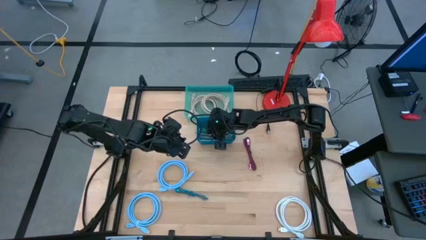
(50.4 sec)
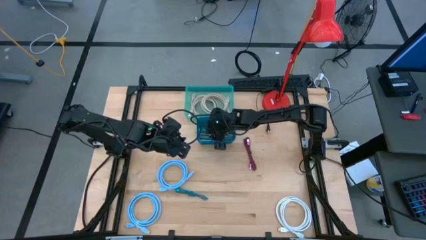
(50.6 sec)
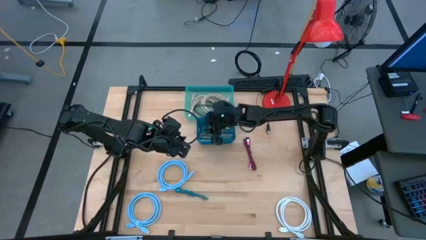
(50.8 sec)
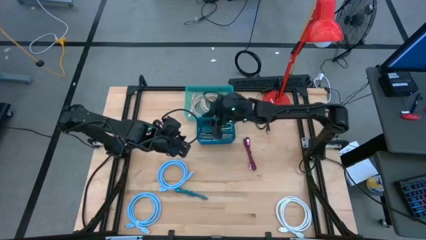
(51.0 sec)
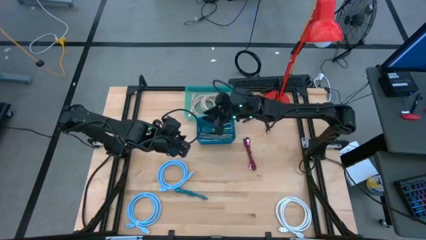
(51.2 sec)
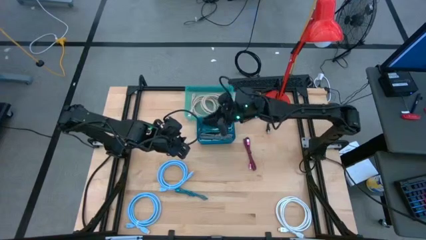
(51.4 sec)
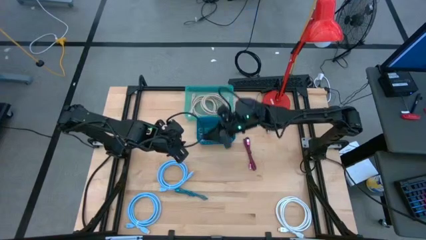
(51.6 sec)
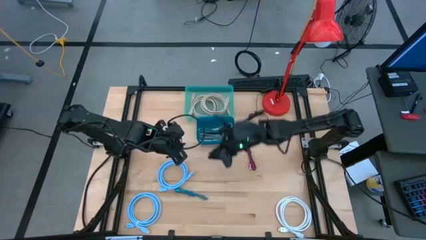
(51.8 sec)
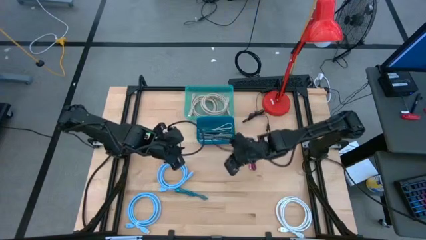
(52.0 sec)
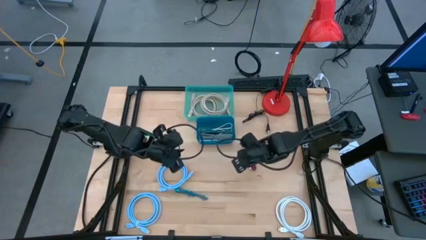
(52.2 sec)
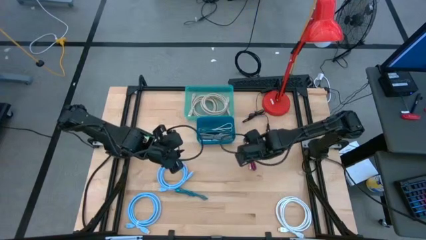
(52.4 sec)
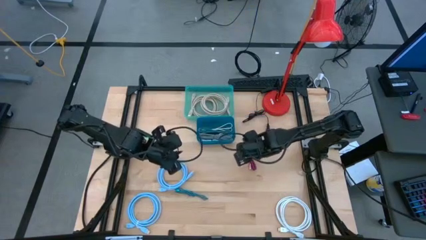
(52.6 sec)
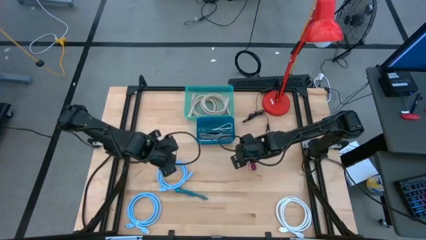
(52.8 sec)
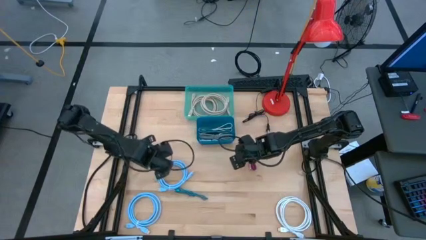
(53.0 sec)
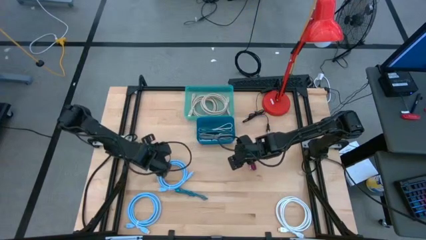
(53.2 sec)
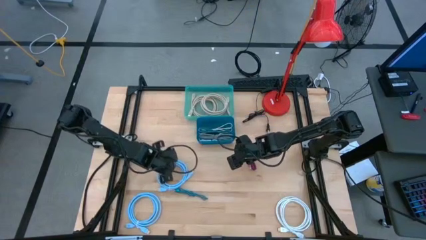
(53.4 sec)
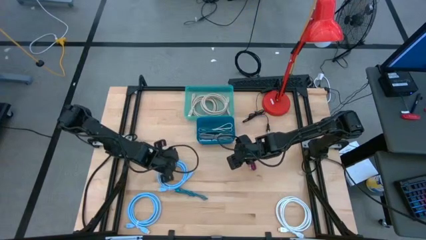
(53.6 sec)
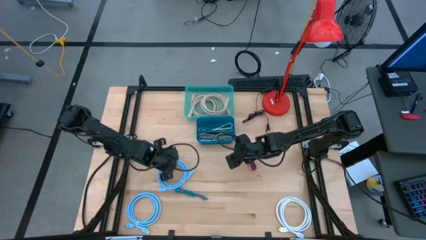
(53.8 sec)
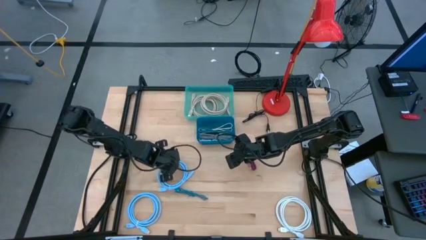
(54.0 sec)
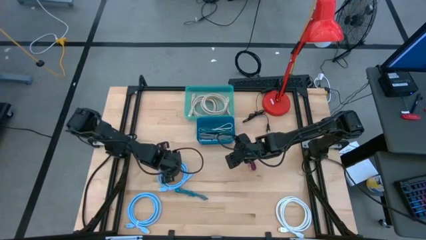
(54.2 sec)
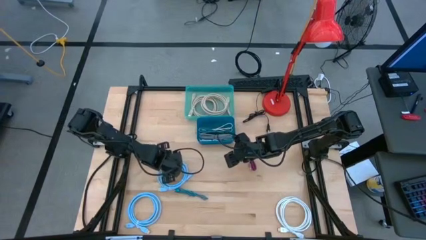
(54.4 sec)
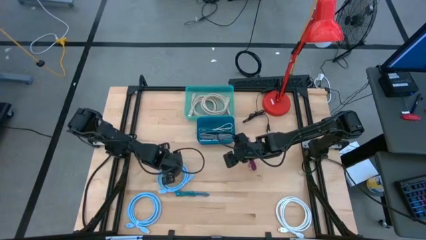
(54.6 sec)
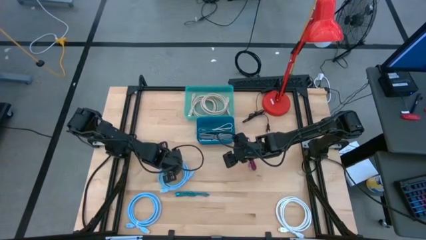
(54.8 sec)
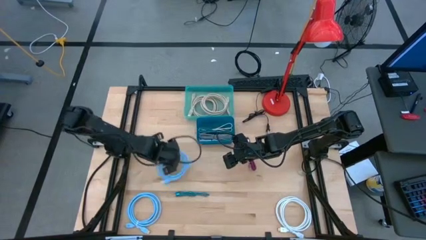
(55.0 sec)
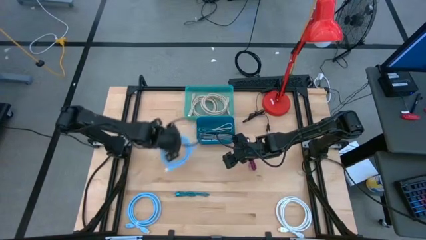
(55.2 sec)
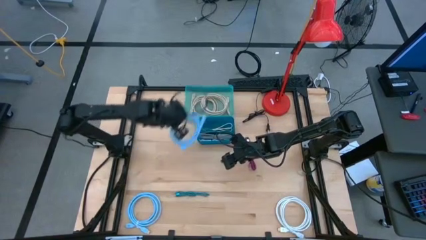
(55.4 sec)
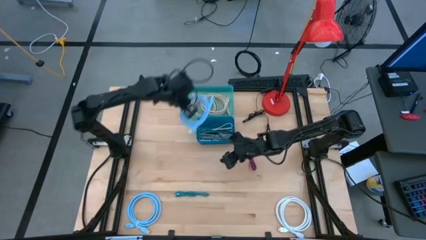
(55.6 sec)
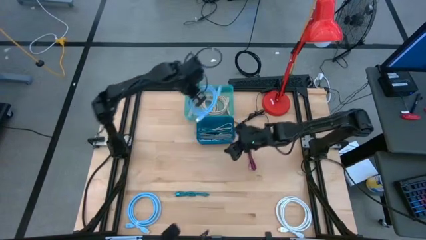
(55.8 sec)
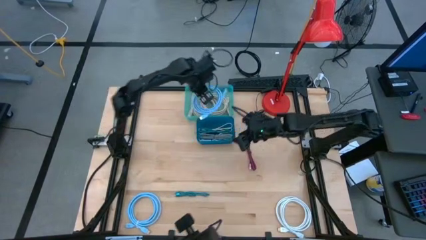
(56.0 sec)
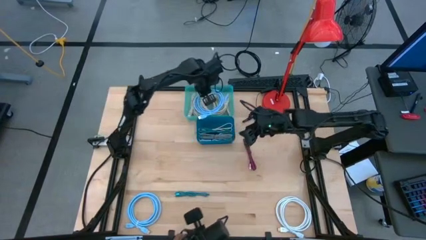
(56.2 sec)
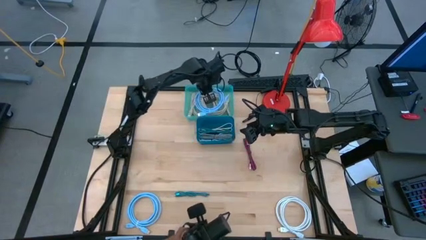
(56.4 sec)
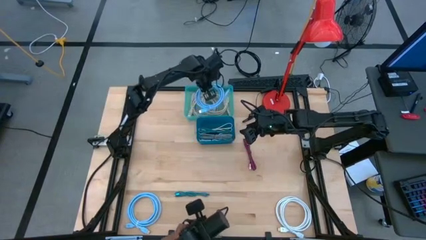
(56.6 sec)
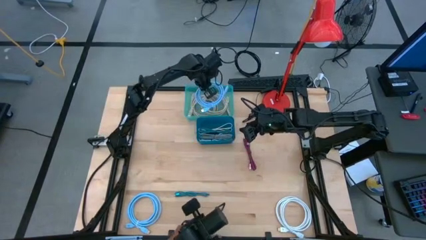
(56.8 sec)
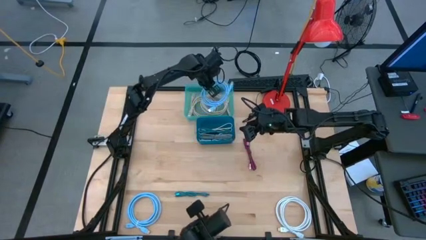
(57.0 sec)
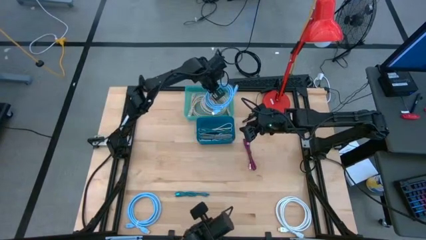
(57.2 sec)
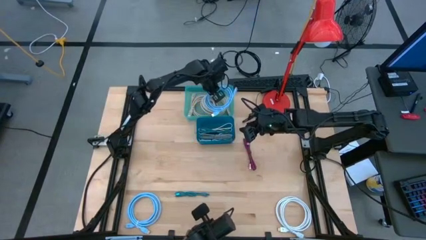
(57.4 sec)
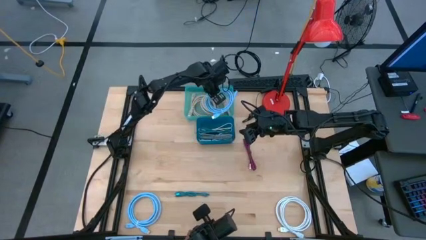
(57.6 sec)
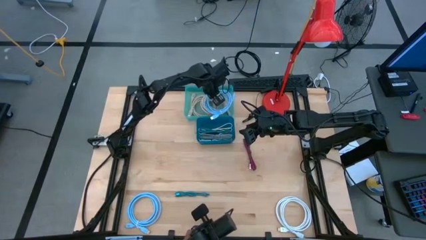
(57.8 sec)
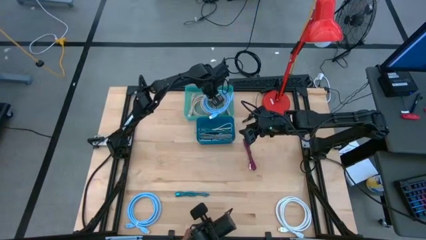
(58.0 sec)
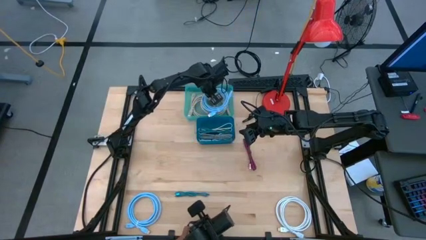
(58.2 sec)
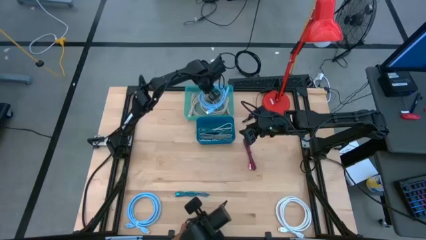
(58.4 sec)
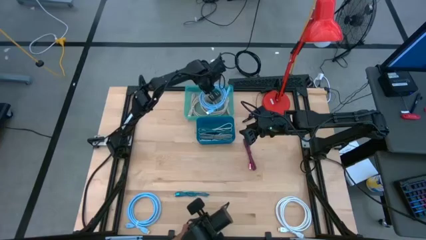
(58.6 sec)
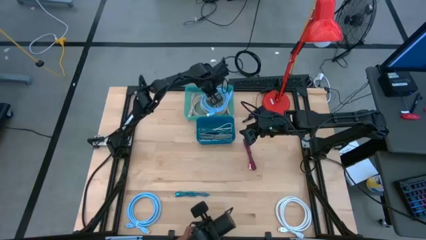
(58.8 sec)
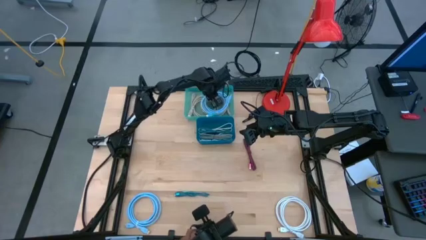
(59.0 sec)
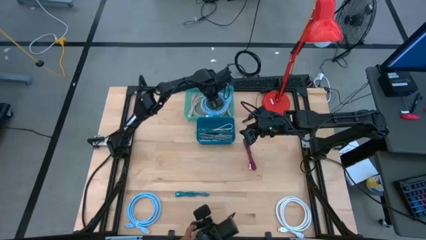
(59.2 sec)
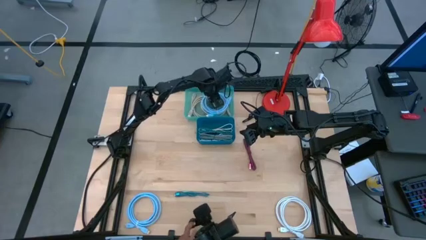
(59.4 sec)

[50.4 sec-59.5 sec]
Task: Pick & Place USB Port
Put the top blue display cable into the green bin

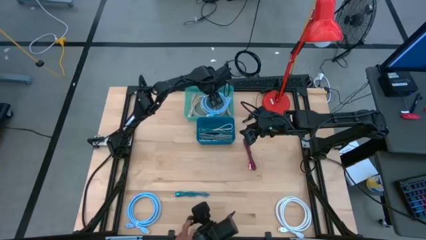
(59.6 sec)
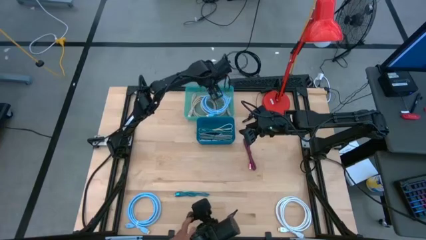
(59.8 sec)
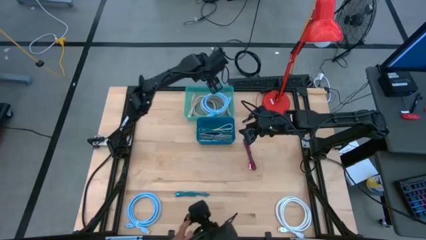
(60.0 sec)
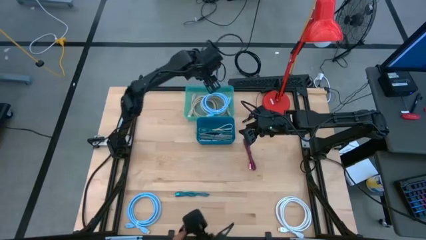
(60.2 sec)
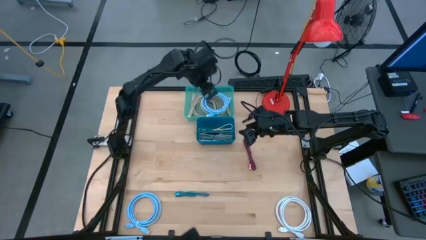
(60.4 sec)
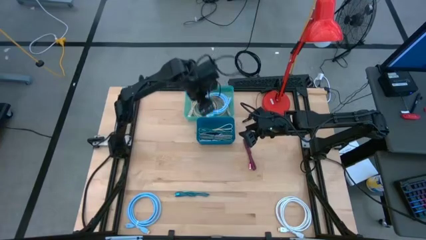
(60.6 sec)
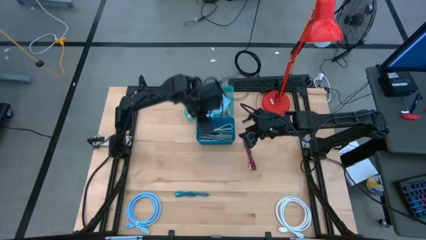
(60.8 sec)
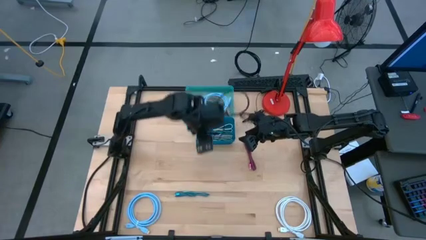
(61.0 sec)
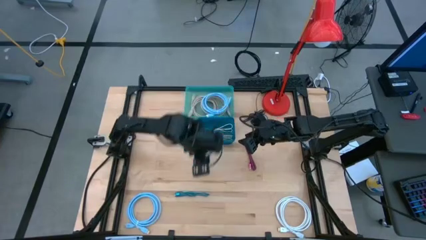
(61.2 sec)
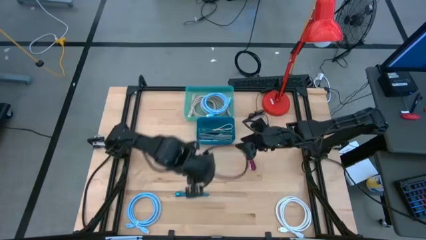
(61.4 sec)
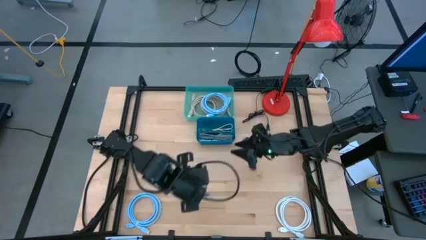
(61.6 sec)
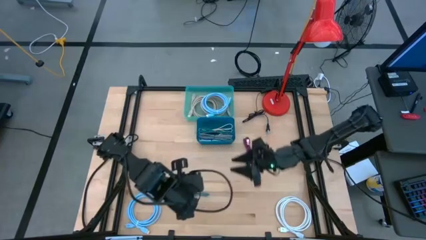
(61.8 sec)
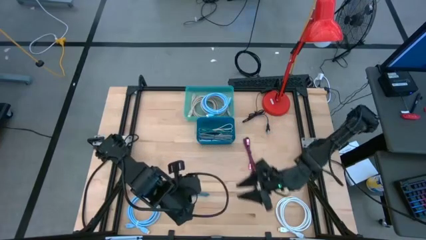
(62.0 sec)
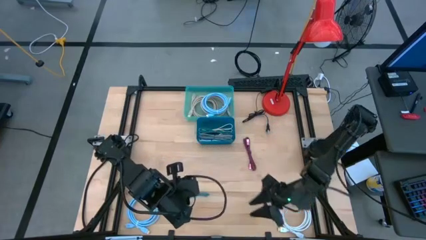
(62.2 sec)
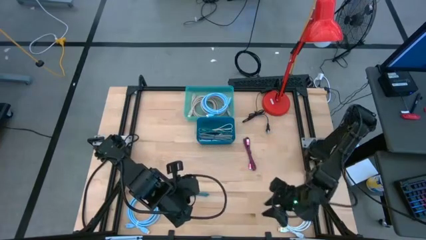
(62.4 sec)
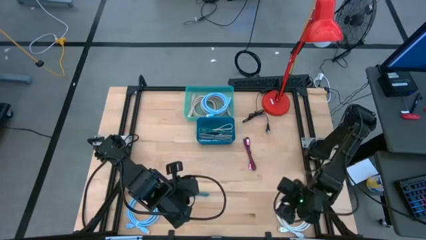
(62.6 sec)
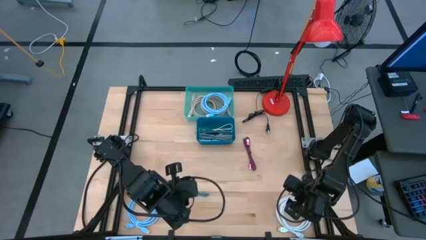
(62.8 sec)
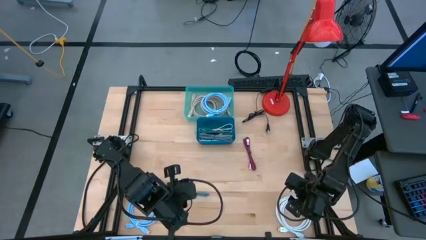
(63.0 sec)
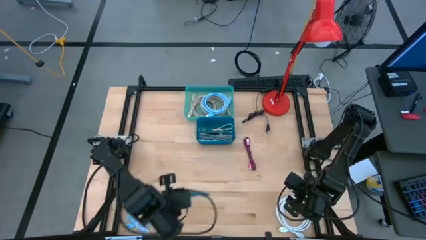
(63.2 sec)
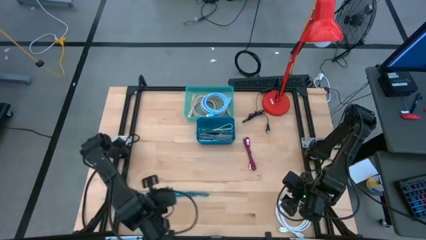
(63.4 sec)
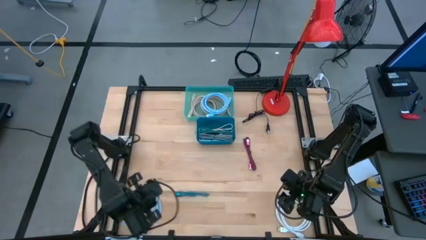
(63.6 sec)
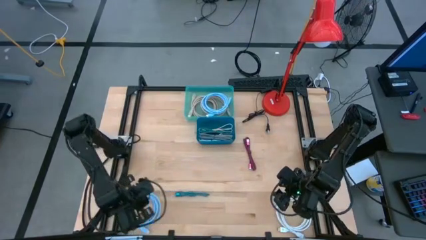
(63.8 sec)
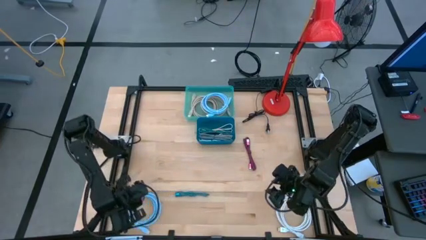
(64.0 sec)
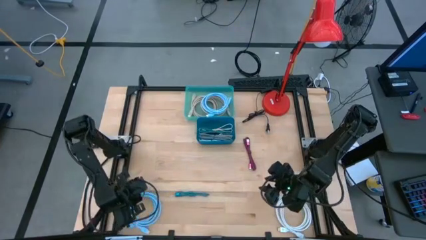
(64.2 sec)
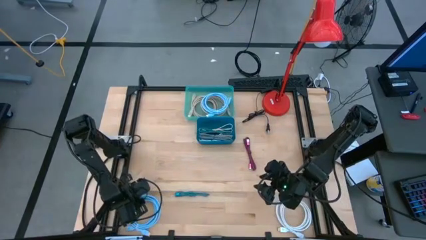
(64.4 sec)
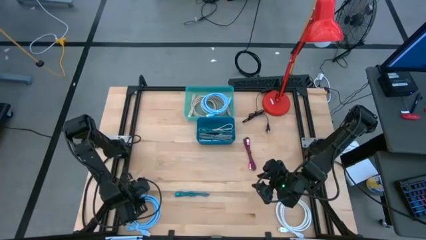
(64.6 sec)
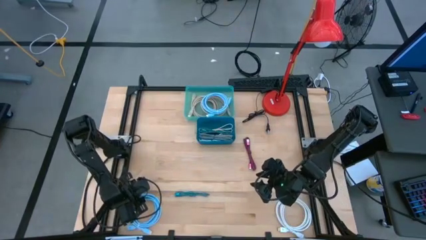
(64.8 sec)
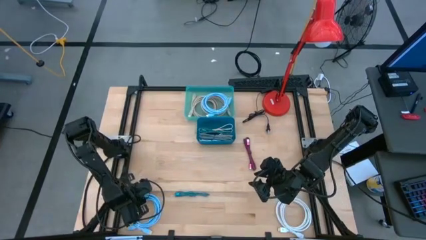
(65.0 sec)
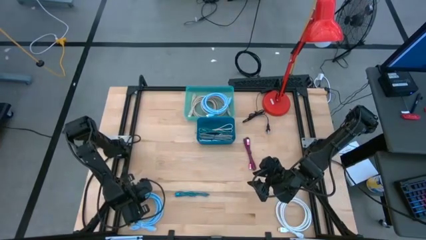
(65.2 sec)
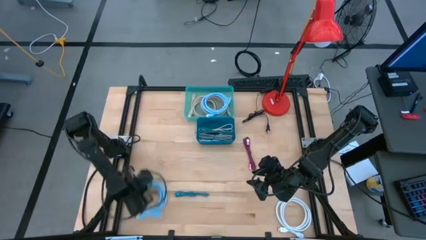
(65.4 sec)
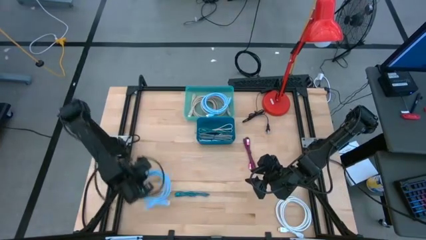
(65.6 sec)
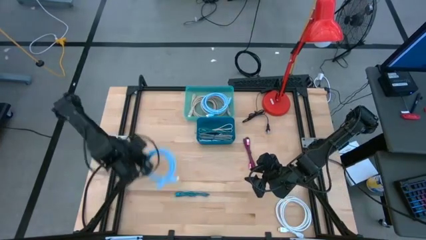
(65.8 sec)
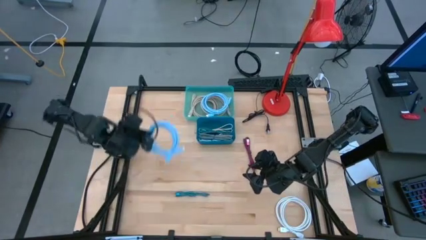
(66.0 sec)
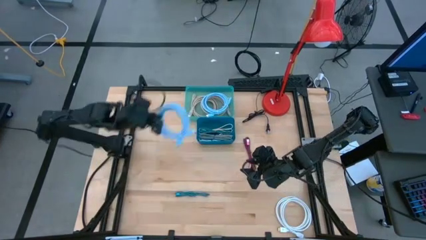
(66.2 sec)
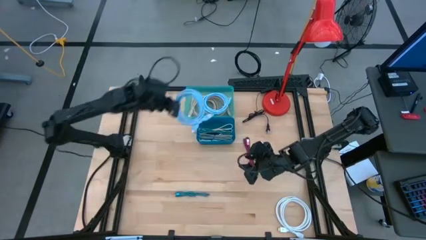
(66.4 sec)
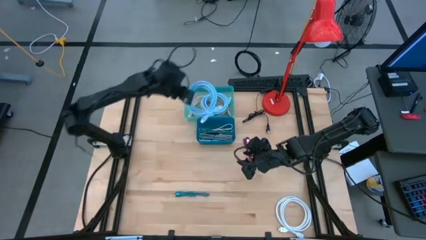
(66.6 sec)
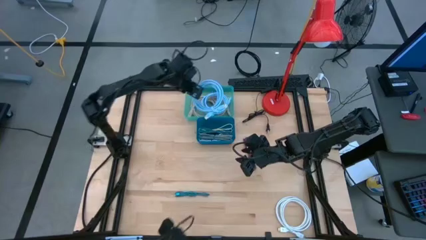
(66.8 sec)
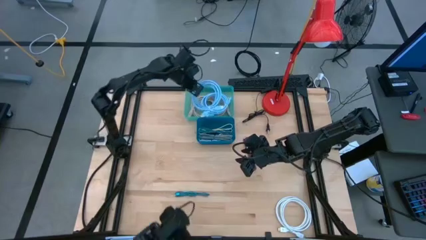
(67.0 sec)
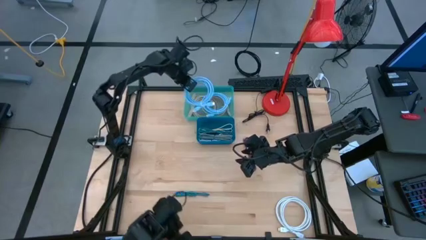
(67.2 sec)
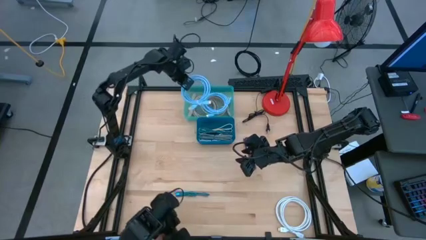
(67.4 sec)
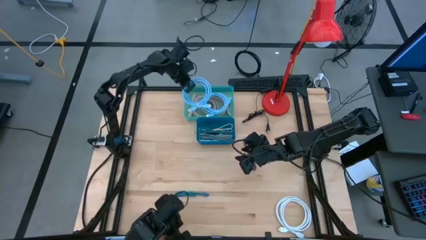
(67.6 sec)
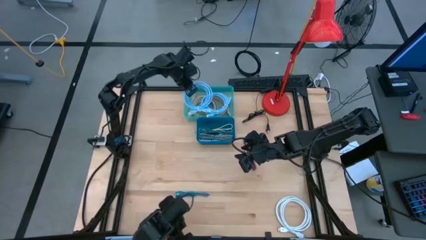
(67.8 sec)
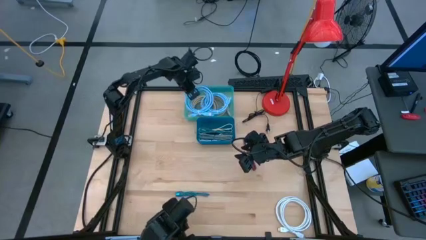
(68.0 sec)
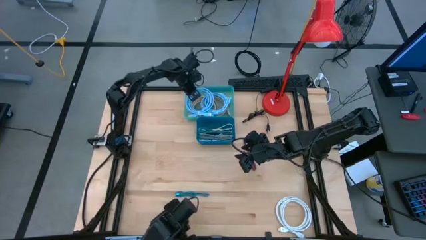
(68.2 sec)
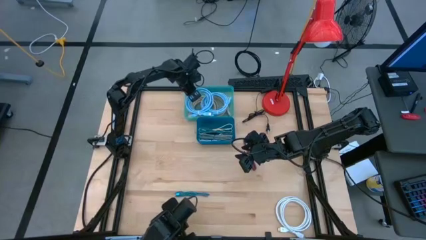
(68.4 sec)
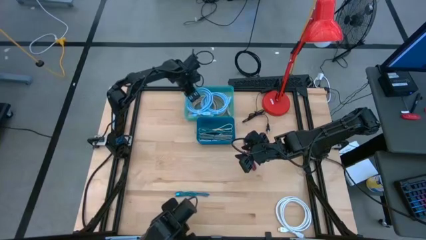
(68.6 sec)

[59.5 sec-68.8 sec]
Put the blue display cable into the green bin
